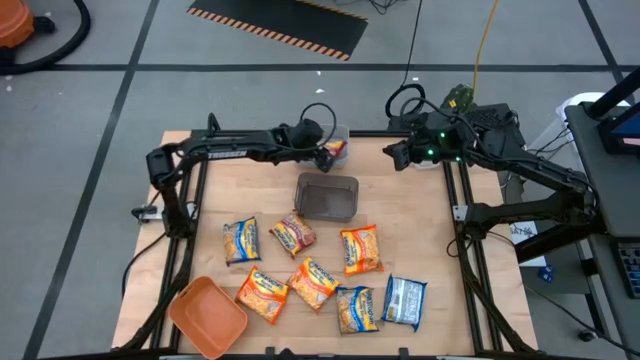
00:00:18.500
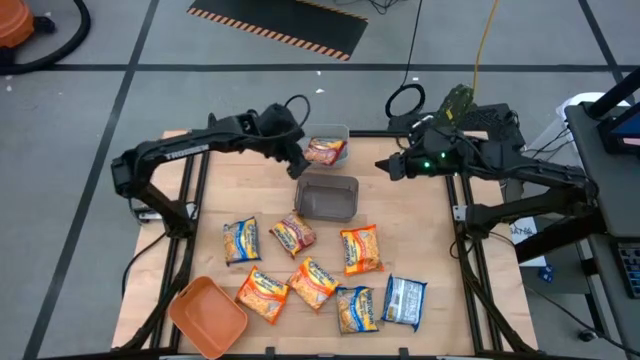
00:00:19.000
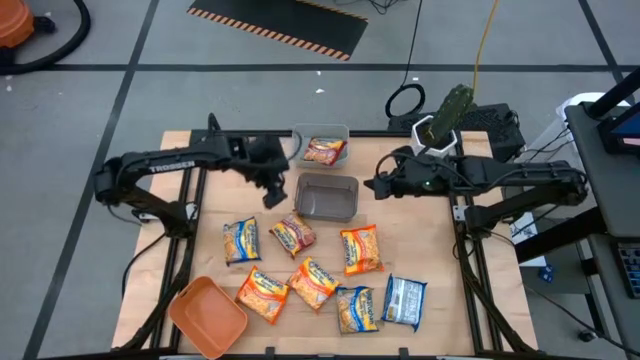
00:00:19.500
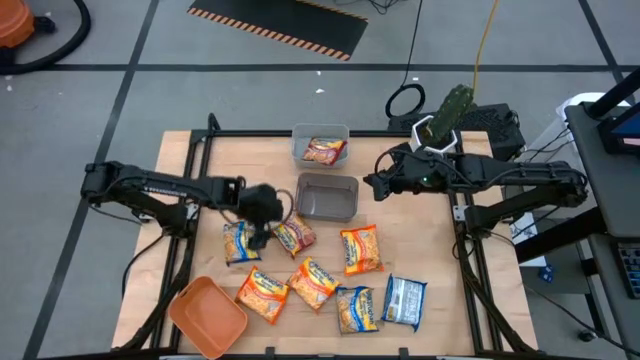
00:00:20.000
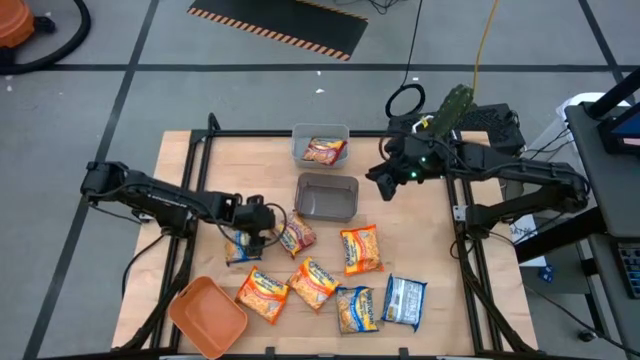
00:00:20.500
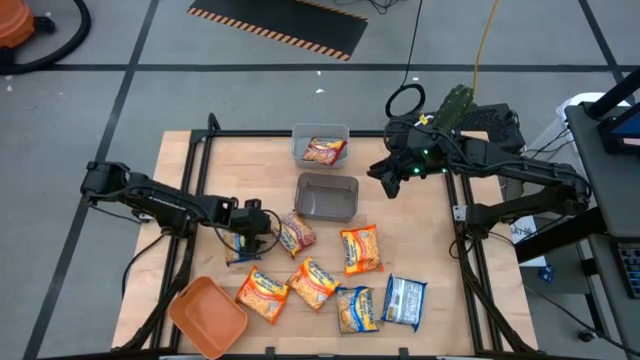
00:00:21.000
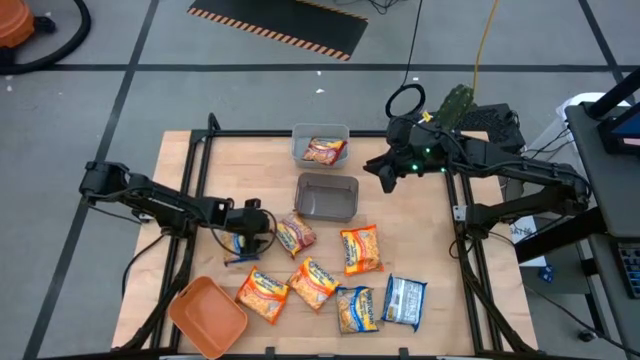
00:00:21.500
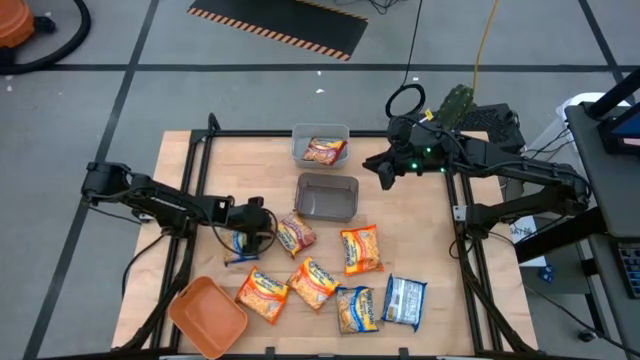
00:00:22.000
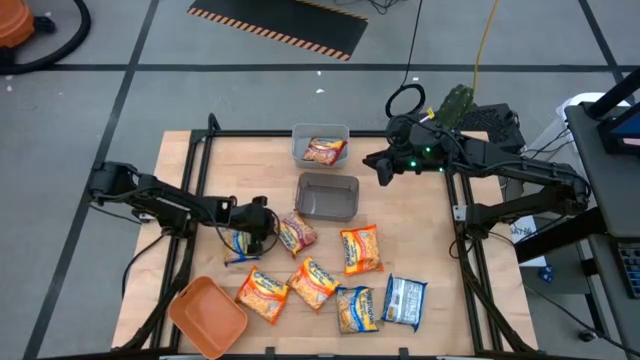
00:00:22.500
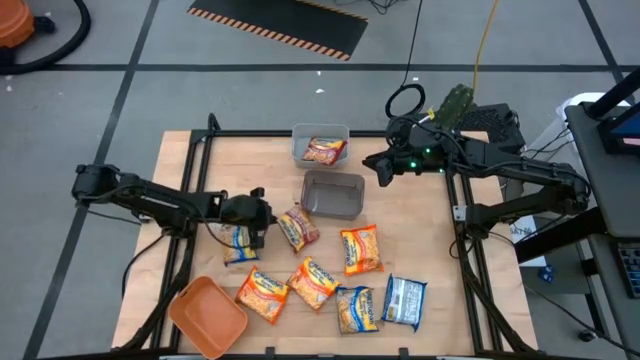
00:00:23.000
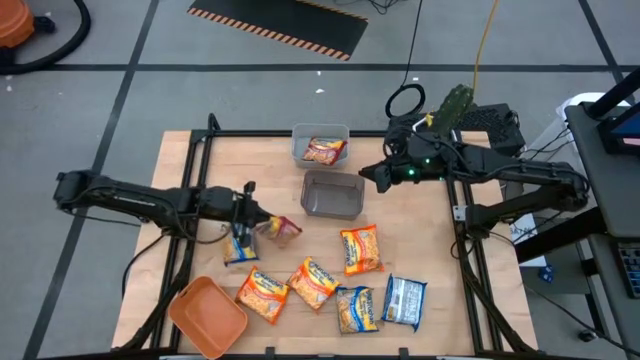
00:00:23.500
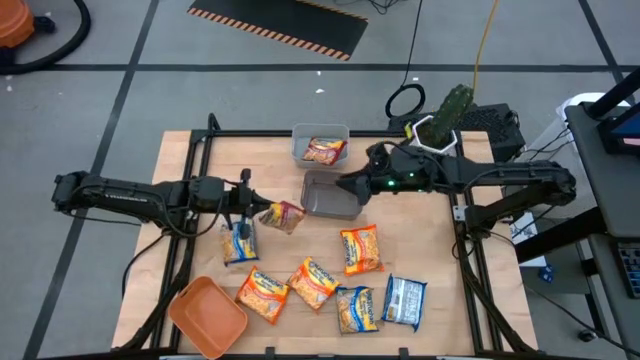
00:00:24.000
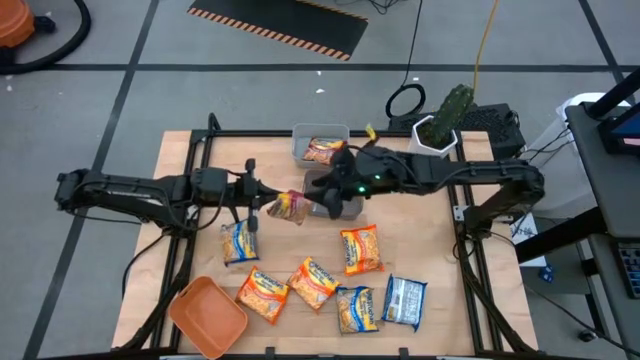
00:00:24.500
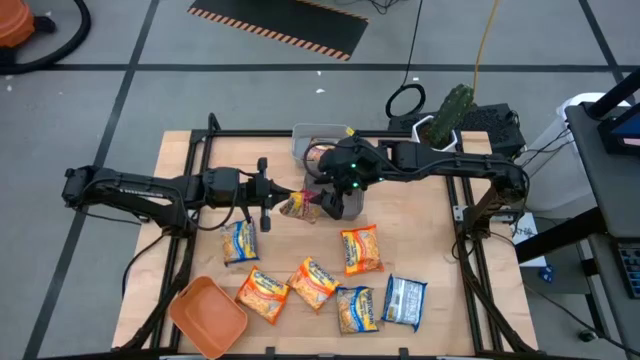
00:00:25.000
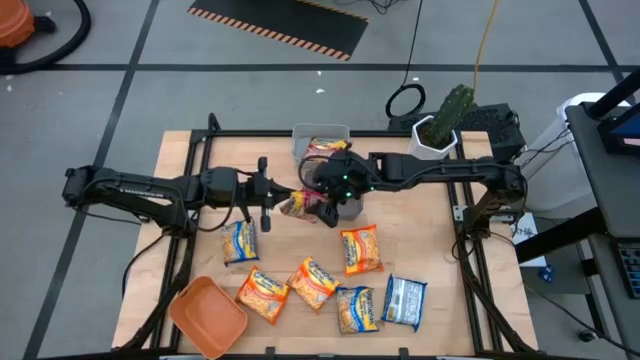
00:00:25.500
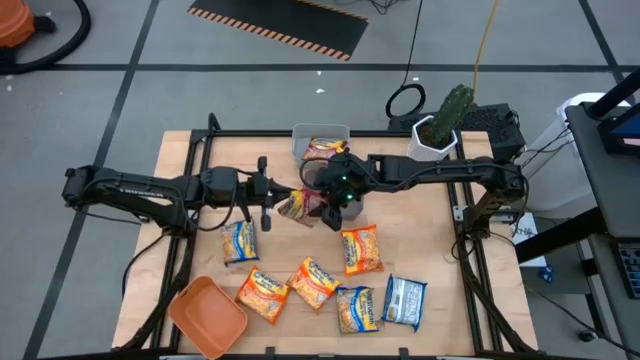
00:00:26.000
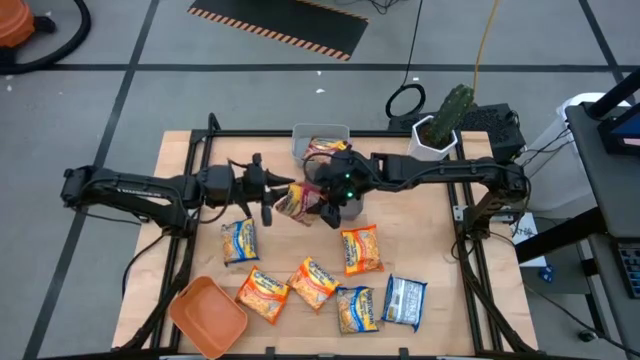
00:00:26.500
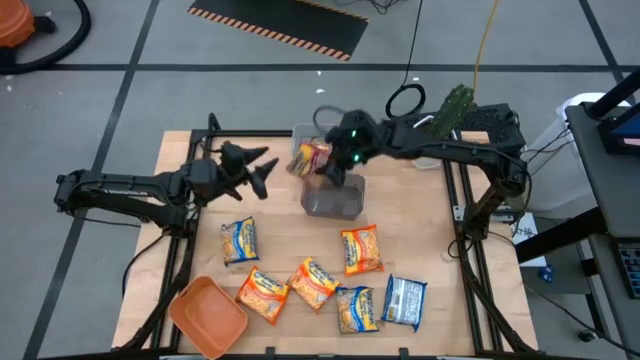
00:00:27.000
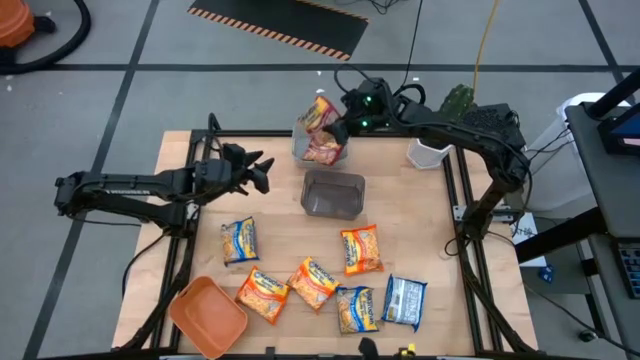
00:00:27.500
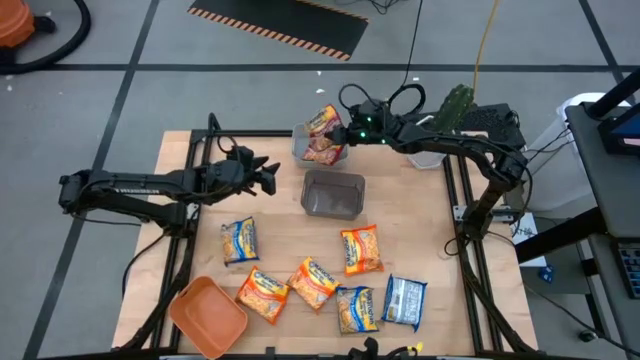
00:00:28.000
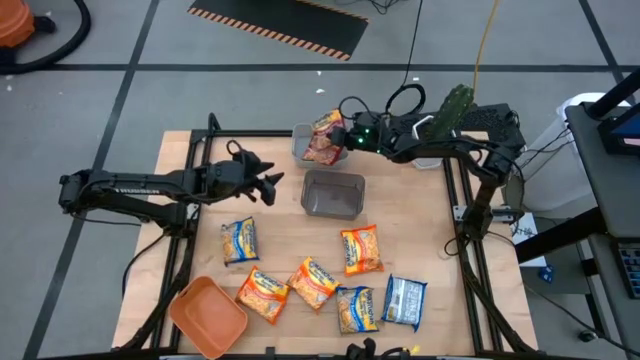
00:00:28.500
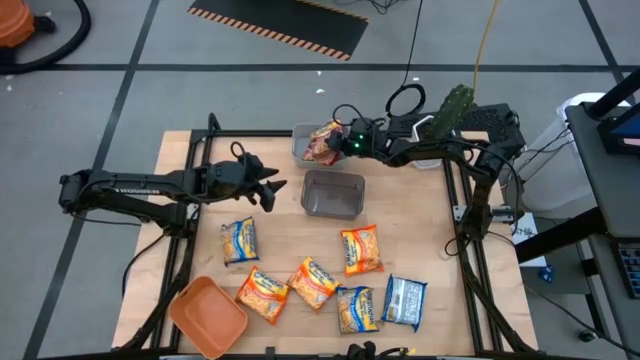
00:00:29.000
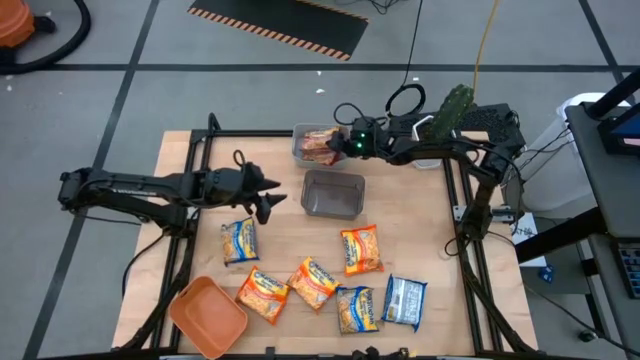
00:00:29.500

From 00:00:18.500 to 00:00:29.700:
Task: Sort Maruchan noodles
Put the red noodle pack into the gray bin

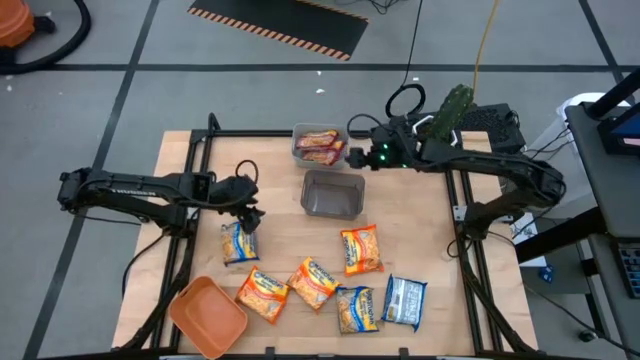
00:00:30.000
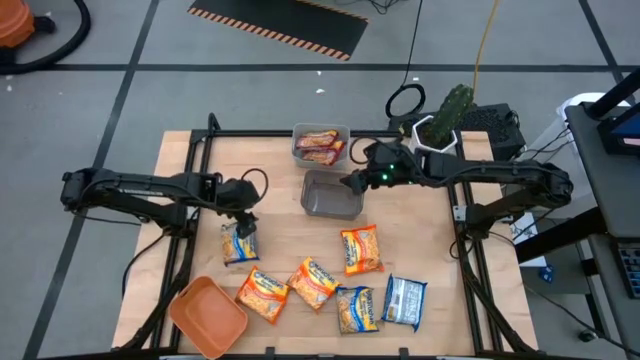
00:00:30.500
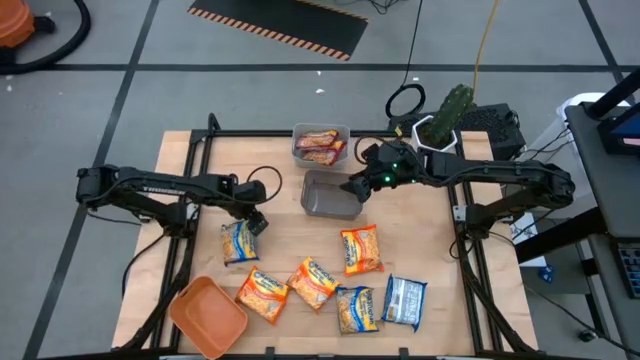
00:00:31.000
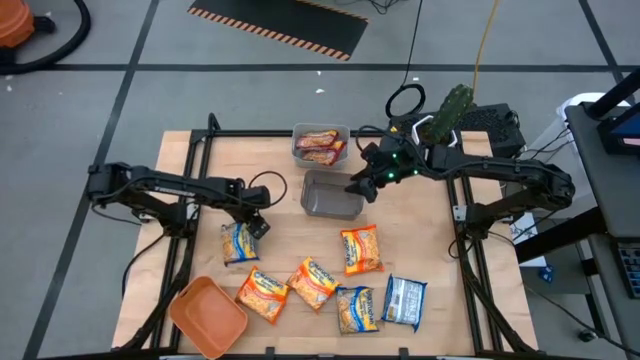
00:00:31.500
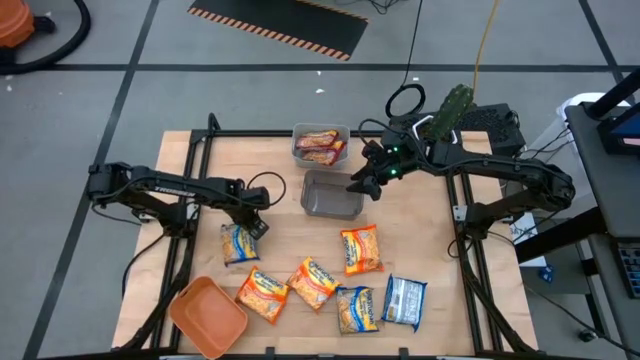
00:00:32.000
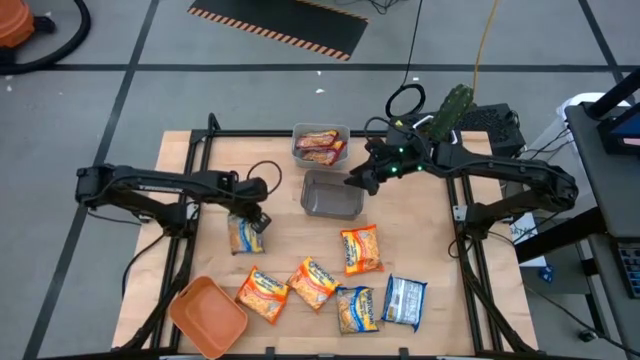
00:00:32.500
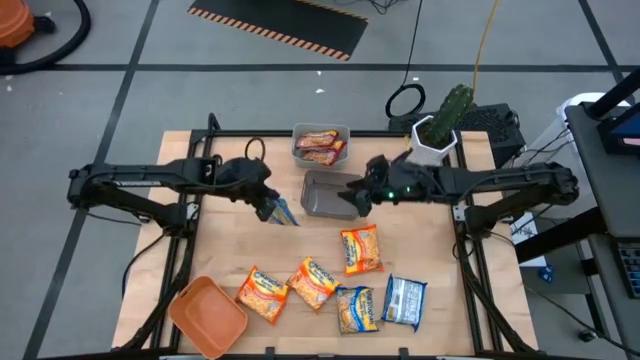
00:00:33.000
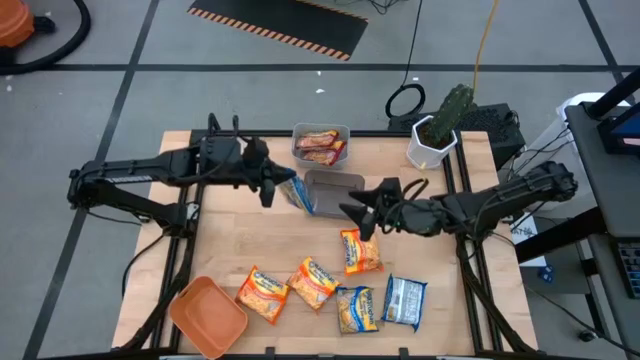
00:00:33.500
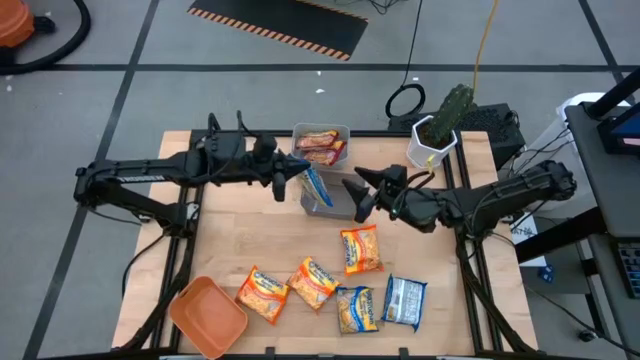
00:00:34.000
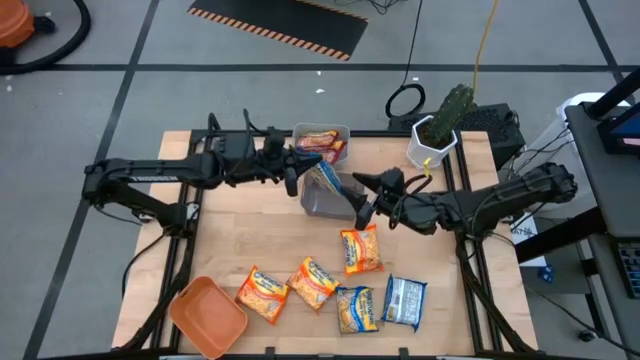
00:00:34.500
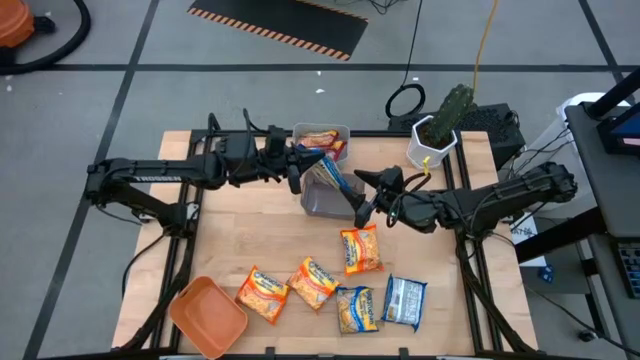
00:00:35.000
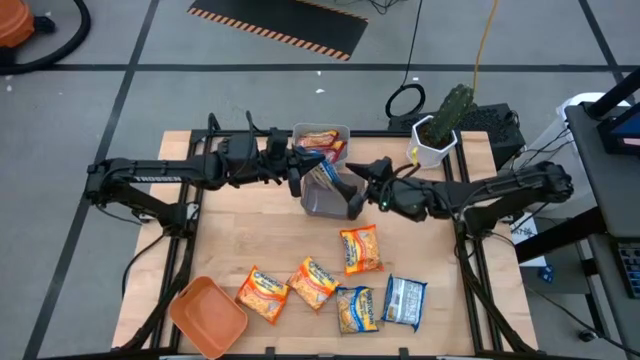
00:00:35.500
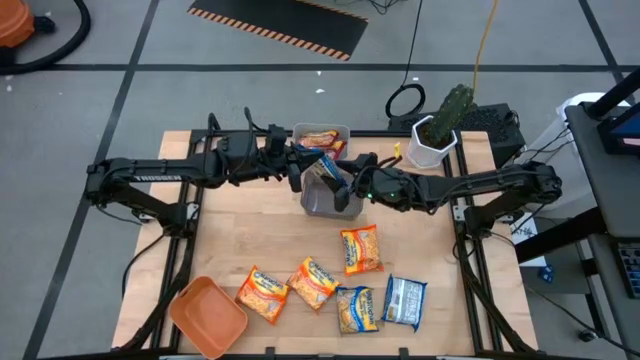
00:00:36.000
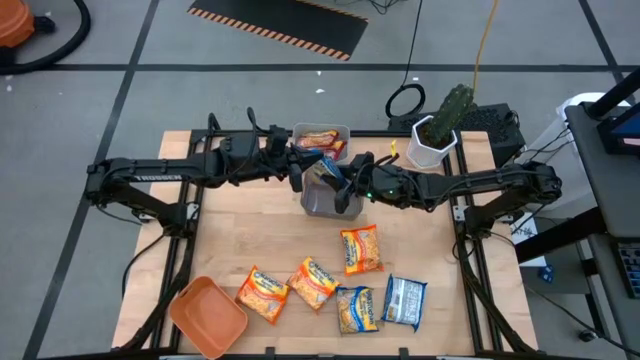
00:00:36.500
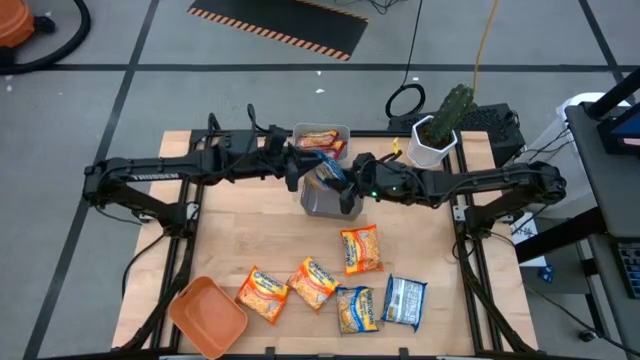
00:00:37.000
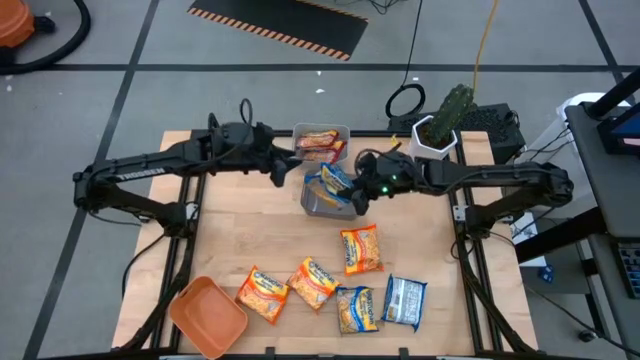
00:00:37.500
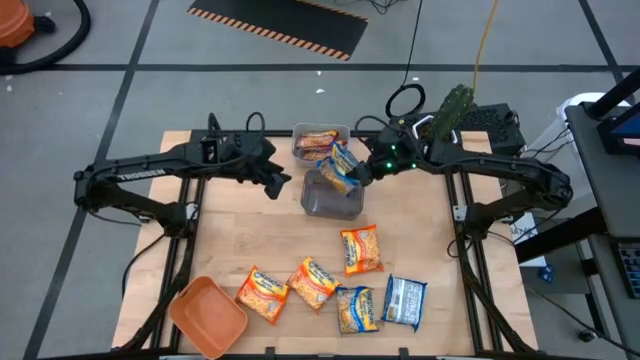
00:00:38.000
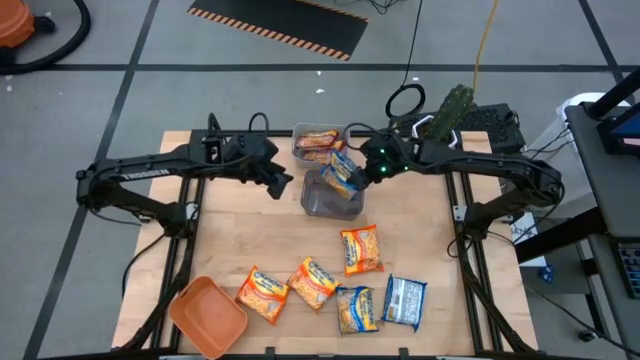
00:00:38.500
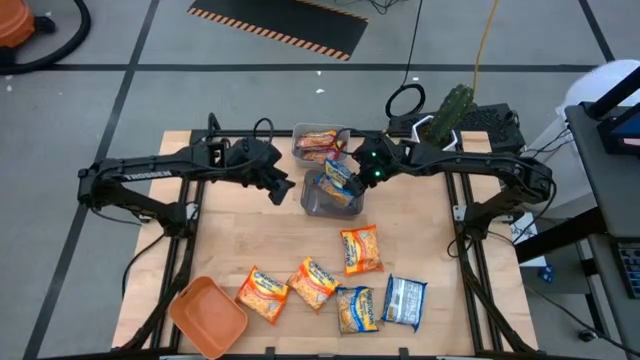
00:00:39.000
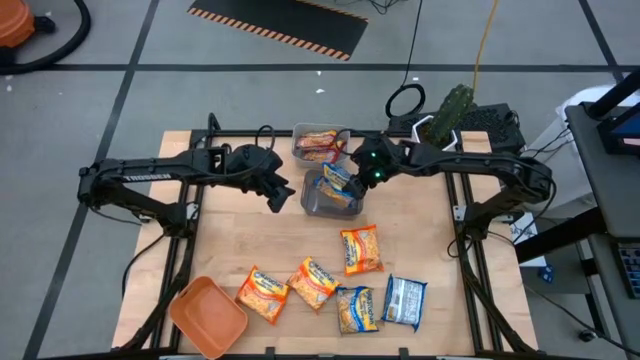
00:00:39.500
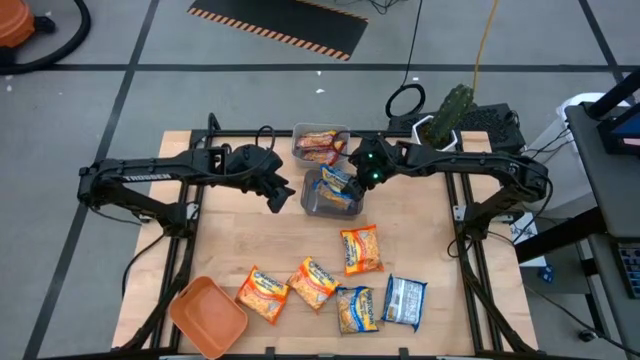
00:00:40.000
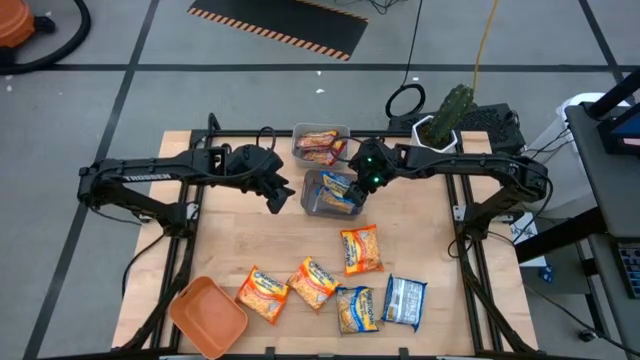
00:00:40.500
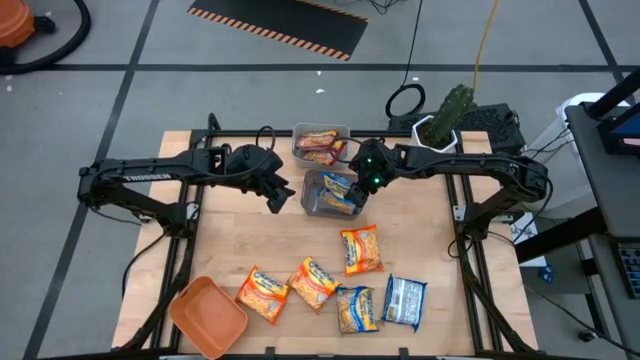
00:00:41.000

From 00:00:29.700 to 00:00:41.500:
Put the left blue noodle pack into the black bin
